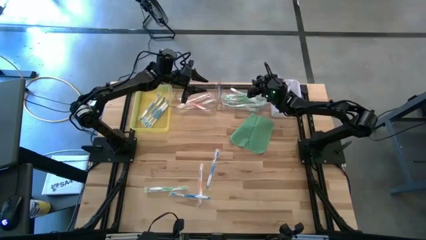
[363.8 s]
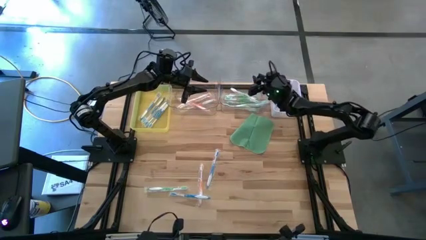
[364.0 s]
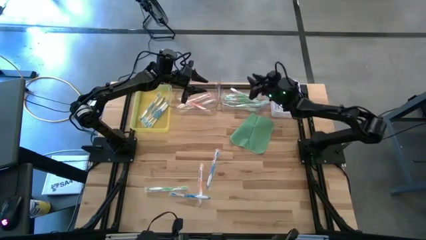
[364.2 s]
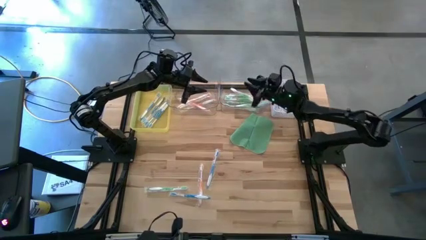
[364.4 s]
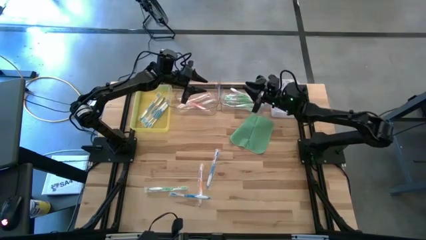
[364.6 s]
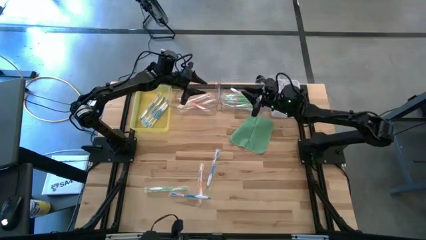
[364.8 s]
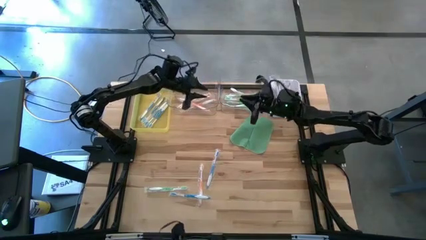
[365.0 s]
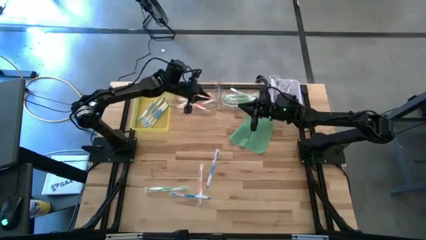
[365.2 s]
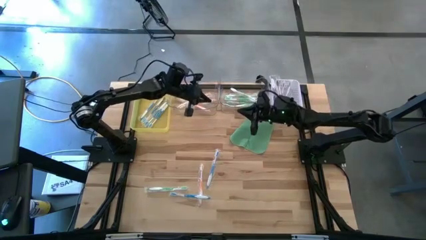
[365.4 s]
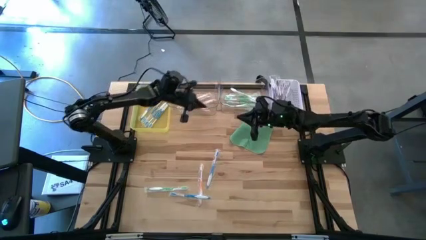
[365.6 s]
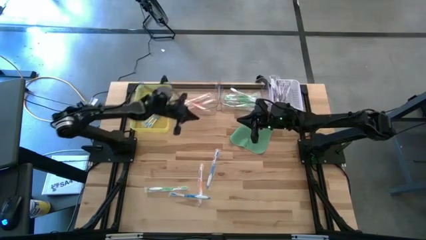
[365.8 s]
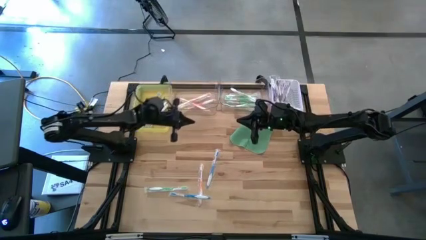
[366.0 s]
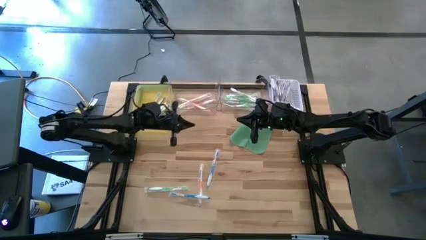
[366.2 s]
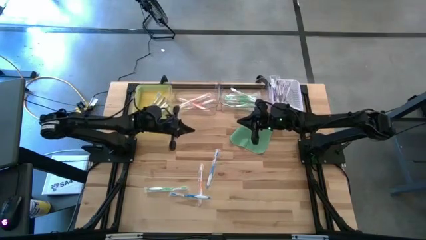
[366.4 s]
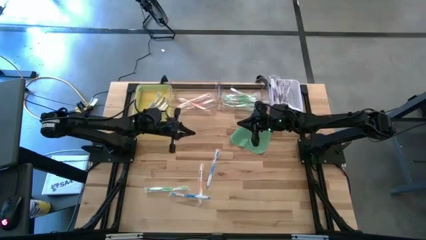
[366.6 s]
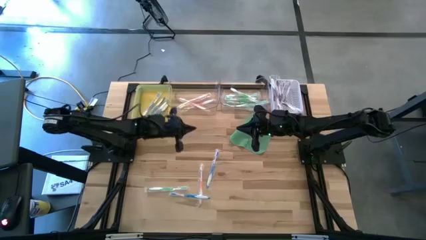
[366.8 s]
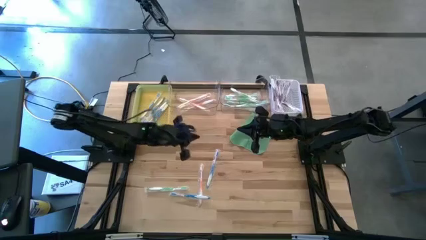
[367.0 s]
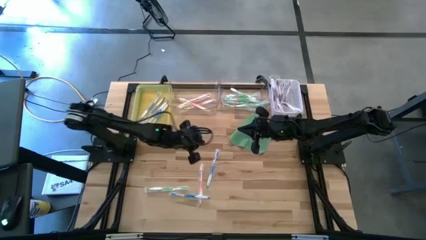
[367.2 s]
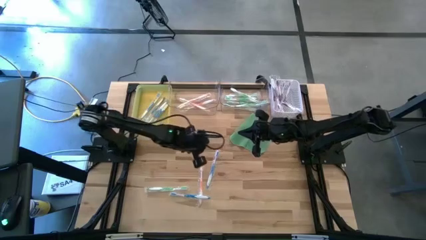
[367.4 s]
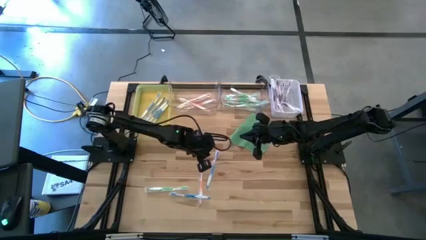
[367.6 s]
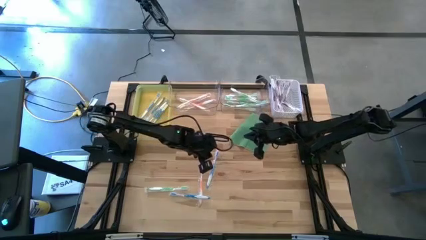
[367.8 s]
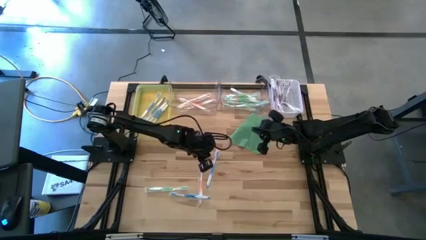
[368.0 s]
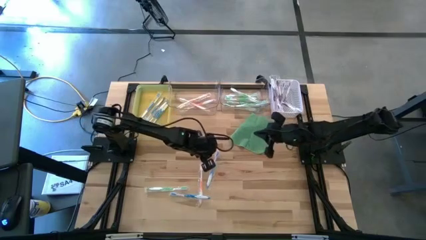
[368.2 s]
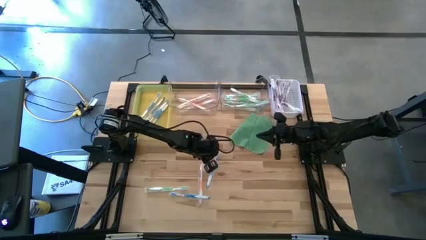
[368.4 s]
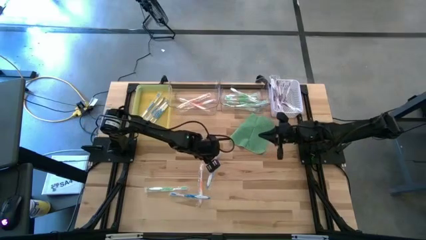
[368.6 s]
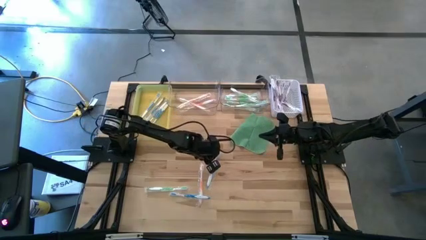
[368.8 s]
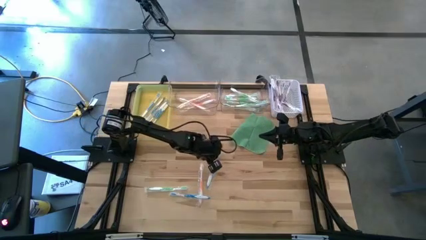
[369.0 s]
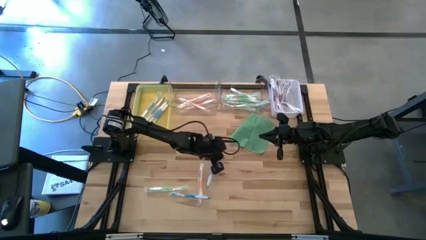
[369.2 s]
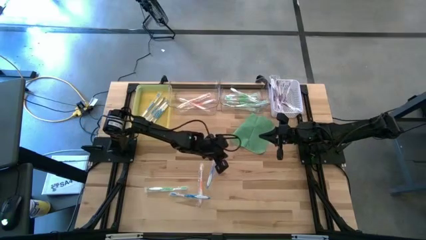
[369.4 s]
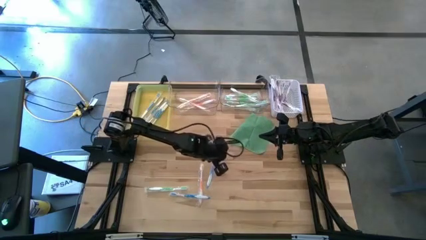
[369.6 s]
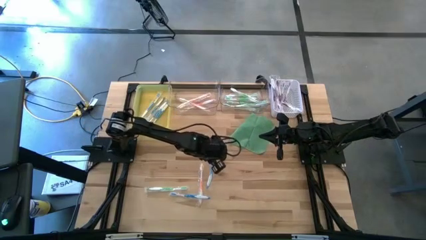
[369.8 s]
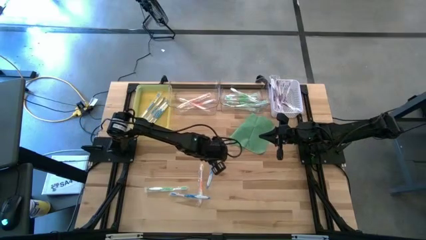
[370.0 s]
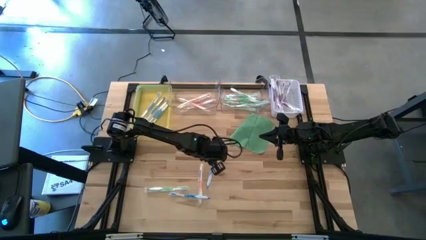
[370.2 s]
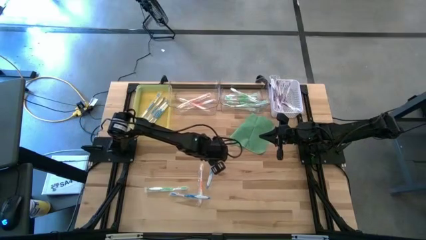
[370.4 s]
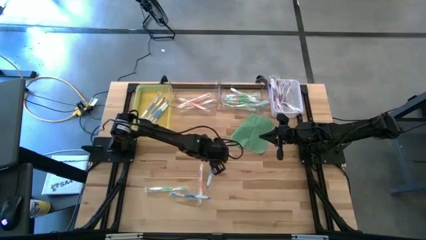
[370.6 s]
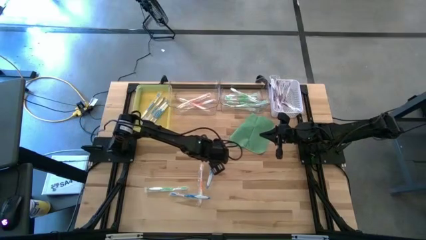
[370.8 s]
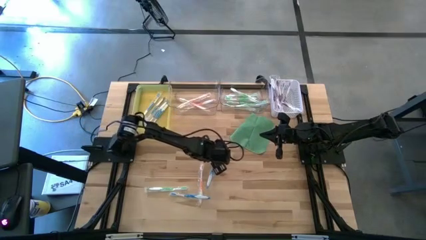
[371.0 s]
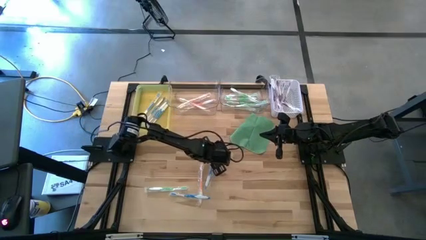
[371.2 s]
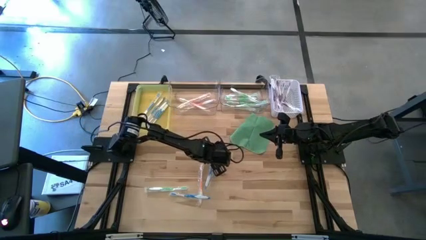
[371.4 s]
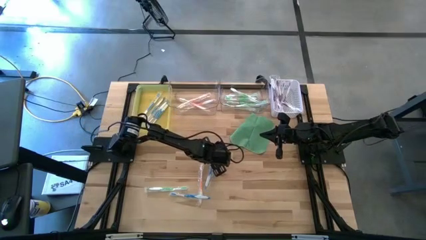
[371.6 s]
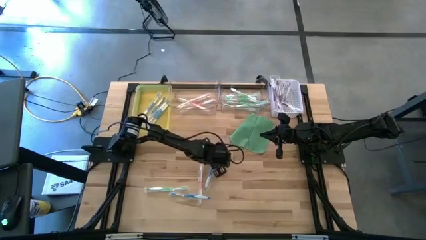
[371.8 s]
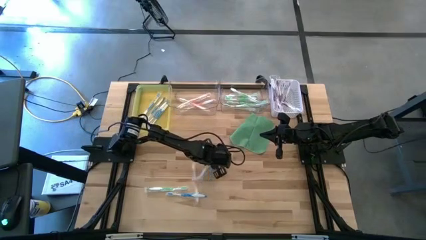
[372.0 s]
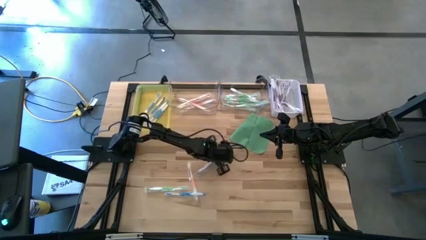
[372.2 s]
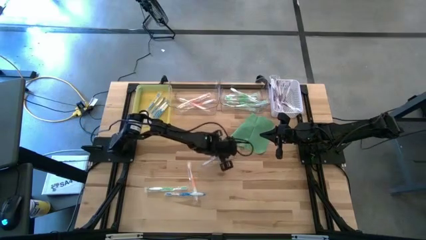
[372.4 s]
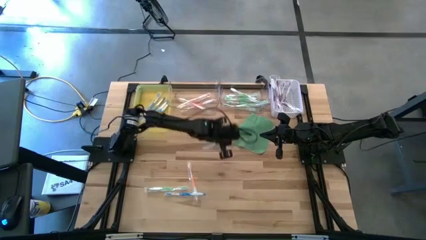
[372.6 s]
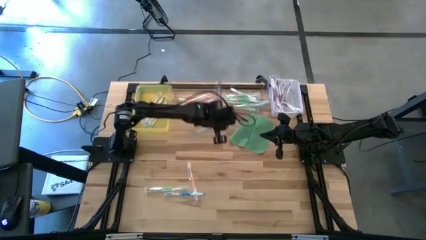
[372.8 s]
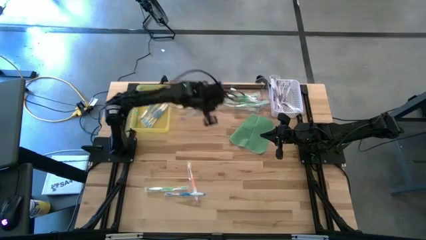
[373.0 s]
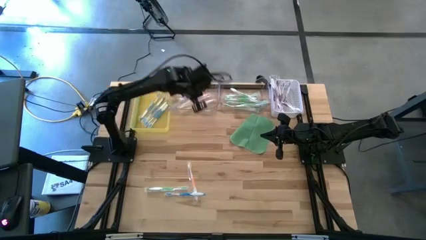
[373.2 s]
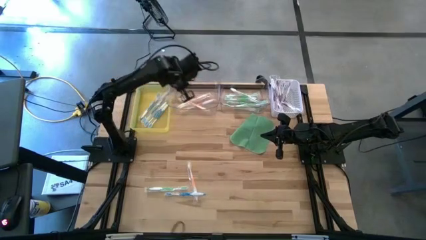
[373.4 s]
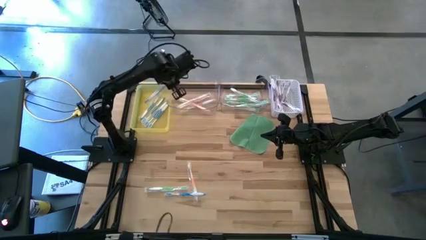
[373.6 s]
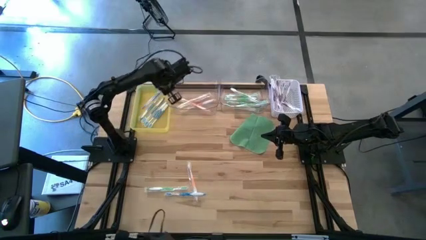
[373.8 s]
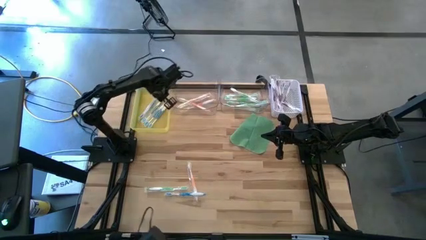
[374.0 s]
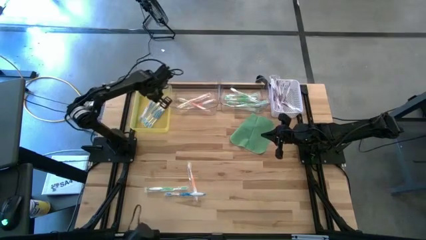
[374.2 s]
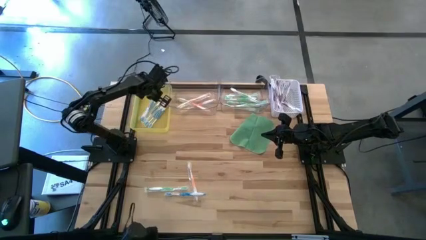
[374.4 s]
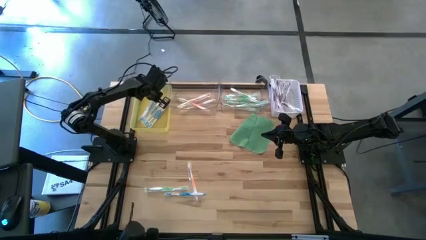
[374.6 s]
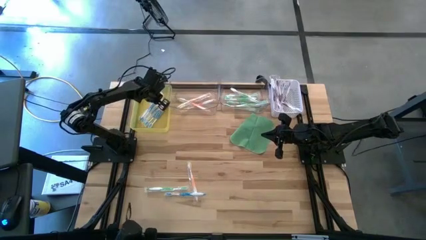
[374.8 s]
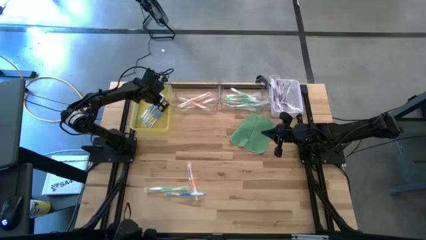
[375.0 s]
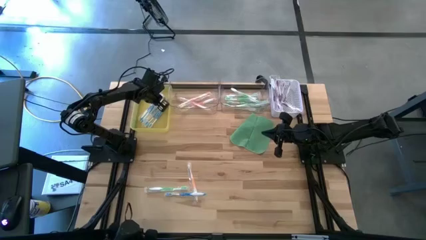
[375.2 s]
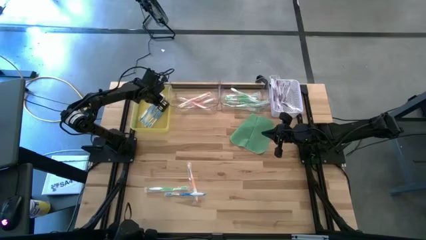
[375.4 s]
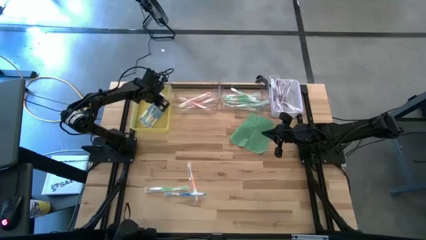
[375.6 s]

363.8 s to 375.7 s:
Task: Pick & Place Toothbrushes
Put the blue toothbrush into the yellow bin

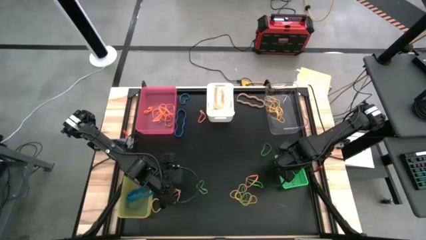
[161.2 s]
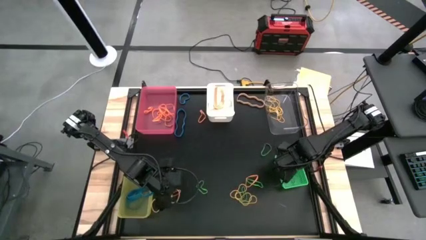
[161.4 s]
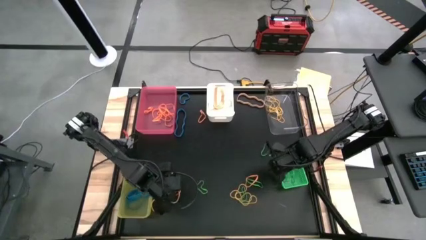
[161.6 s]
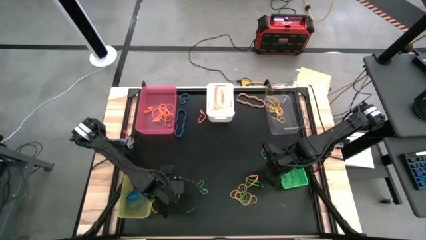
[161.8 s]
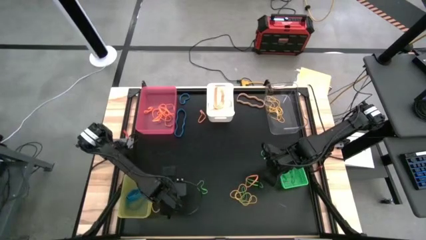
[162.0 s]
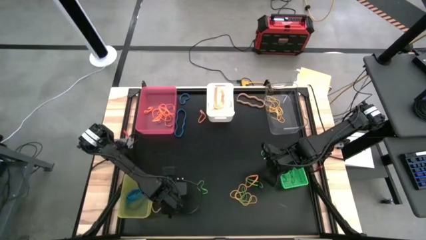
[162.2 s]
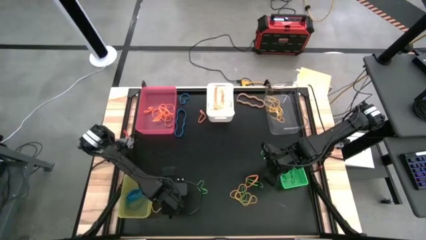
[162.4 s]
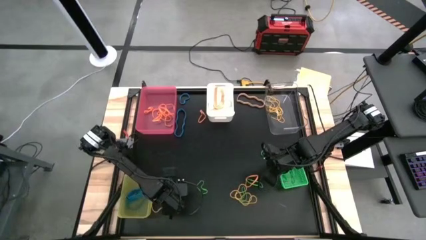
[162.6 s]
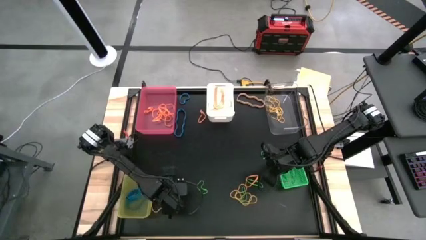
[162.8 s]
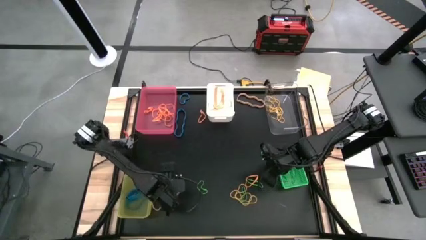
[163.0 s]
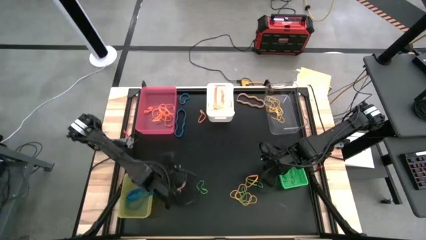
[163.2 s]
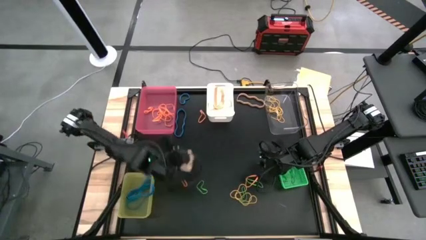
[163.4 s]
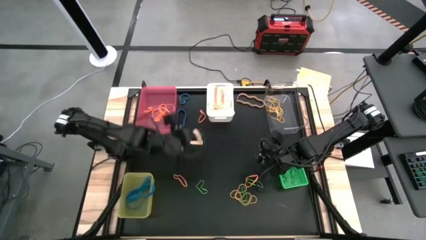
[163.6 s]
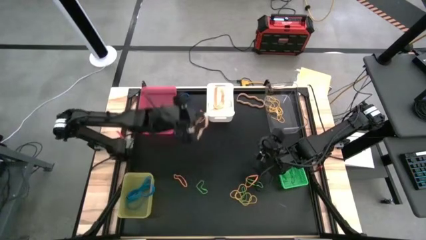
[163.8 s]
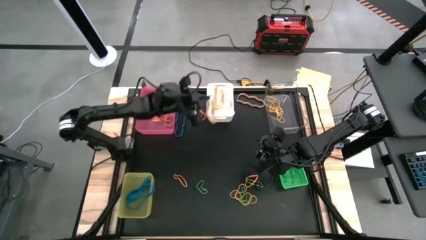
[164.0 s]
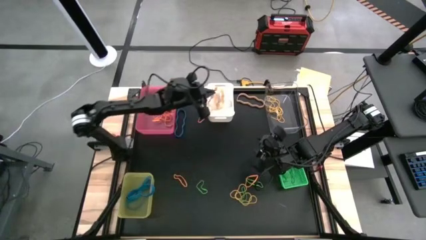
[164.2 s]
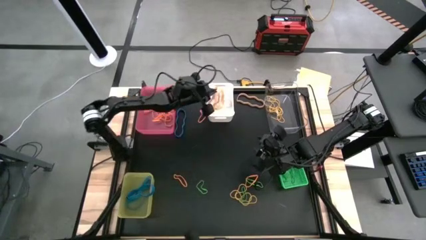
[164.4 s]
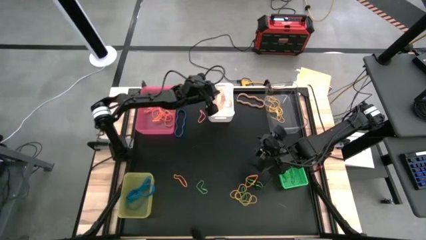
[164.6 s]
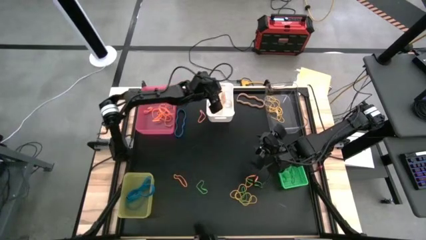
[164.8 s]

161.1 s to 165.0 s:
Task: Sort rubber bands into baskets
Put the light orange rubber band into the white bin

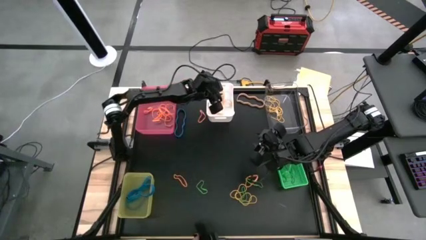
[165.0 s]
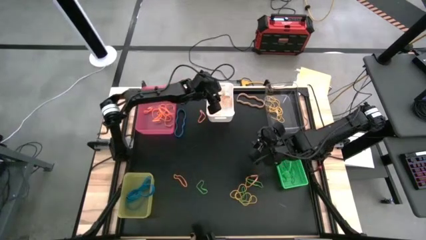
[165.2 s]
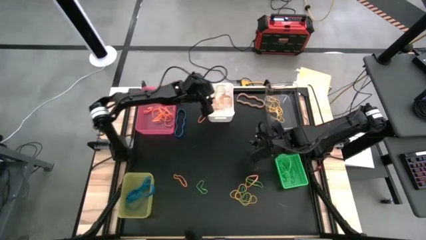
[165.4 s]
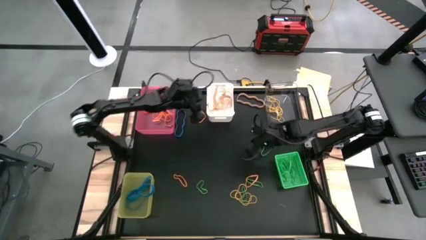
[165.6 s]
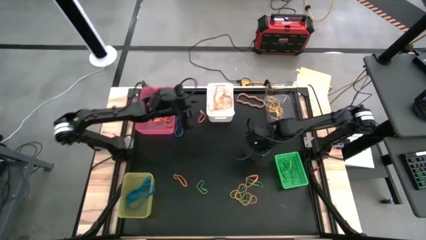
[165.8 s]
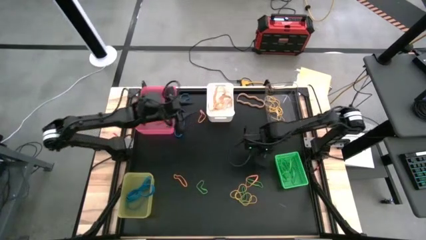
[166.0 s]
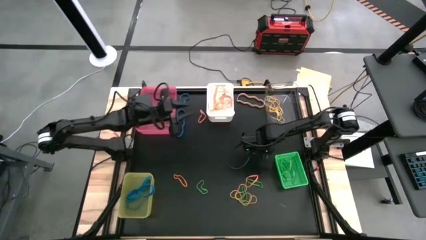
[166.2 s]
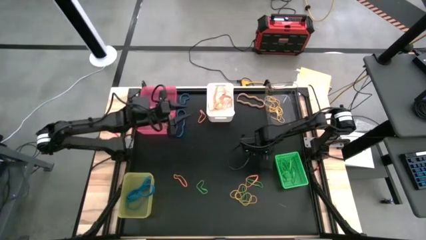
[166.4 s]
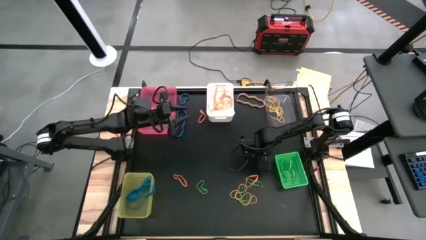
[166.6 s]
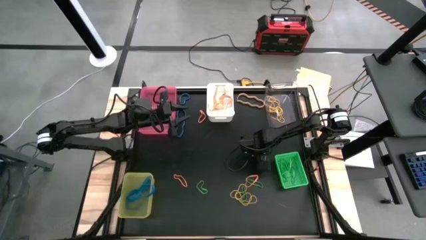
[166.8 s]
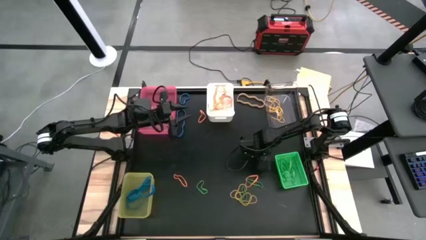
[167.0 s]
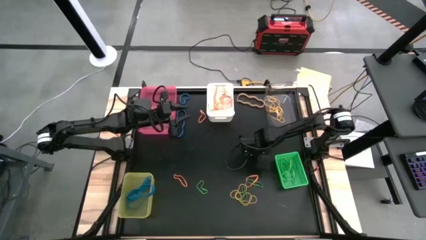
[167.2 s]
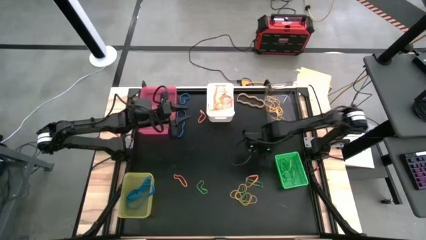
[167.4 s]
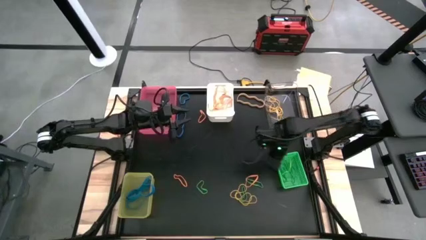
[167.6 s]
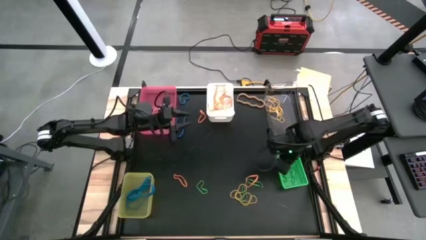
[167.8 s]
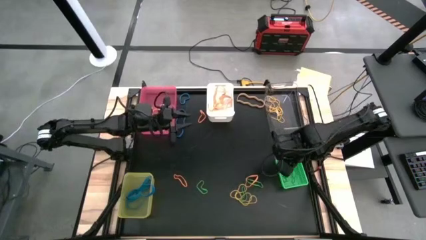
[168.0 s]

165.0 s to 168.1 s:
Put the green rubber band into the green bin
